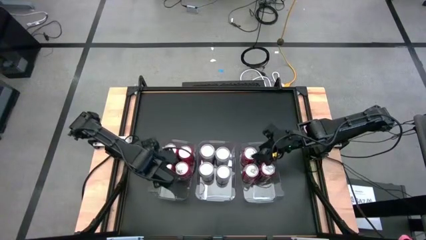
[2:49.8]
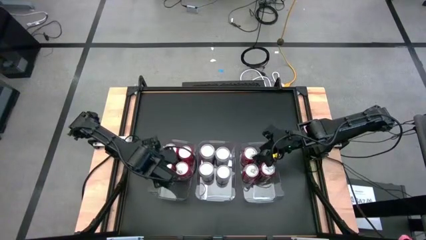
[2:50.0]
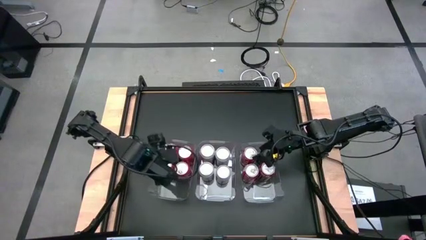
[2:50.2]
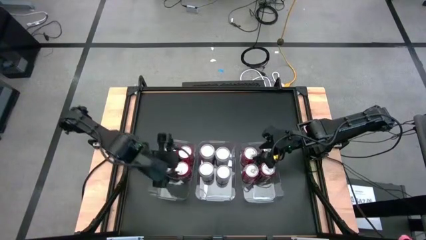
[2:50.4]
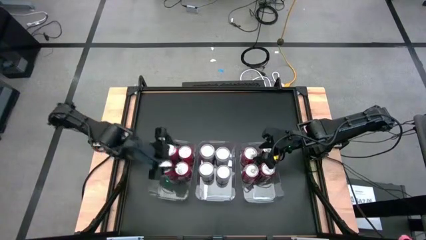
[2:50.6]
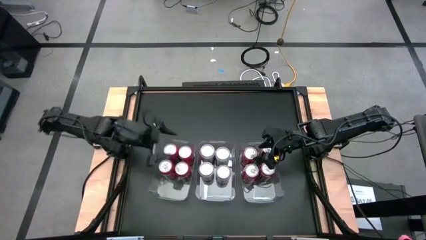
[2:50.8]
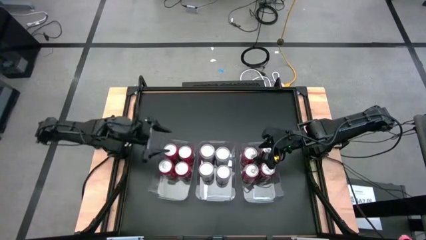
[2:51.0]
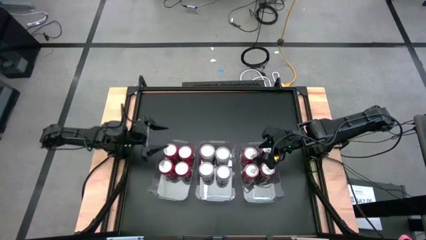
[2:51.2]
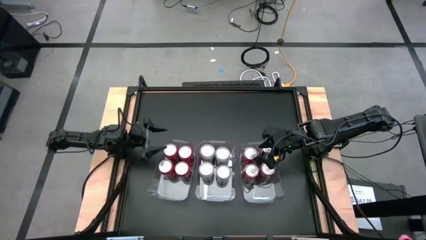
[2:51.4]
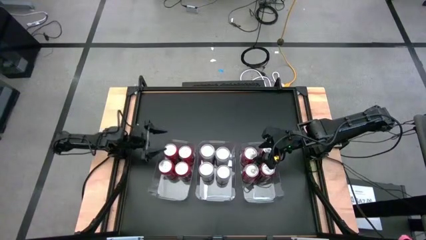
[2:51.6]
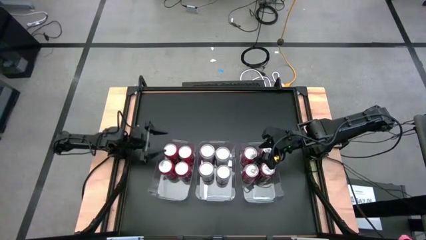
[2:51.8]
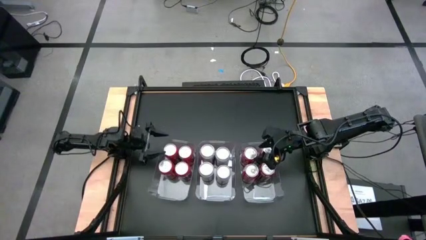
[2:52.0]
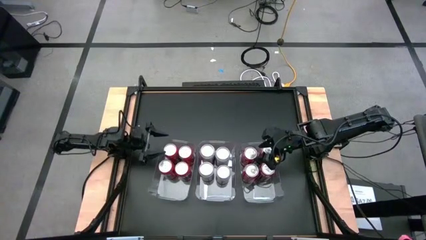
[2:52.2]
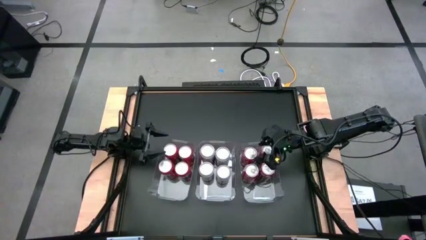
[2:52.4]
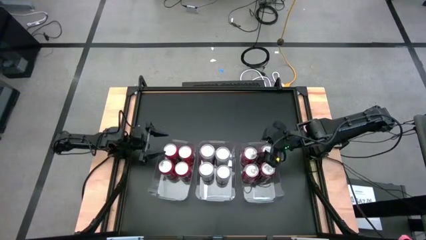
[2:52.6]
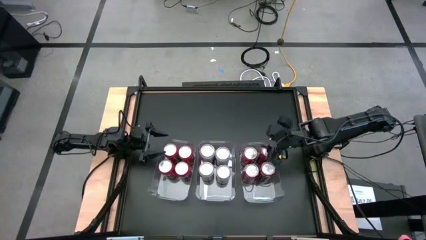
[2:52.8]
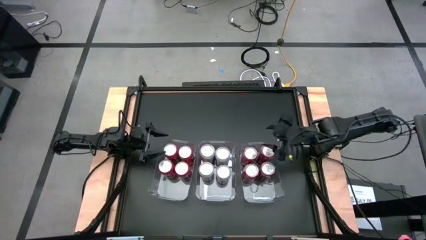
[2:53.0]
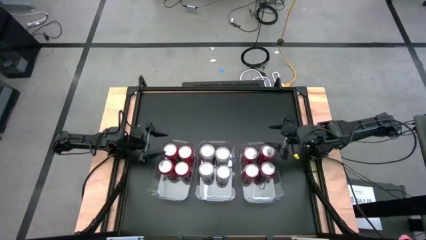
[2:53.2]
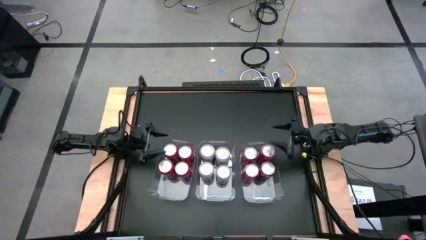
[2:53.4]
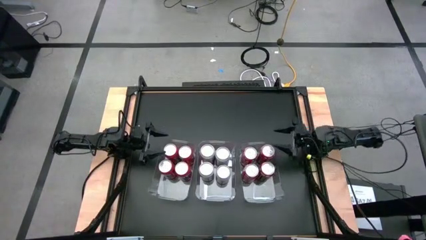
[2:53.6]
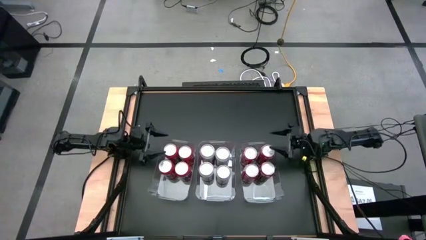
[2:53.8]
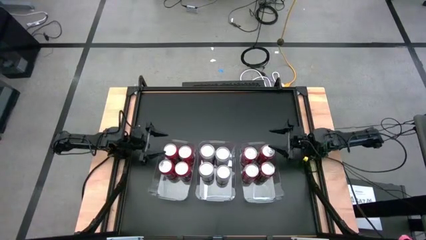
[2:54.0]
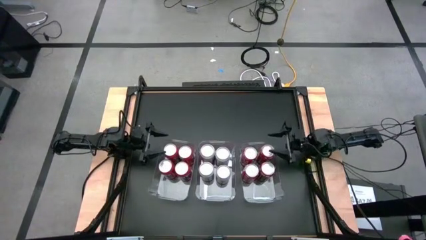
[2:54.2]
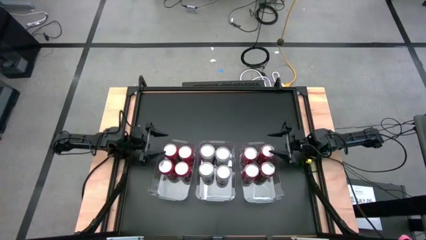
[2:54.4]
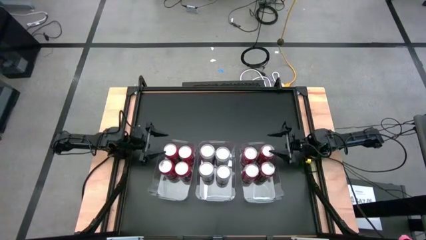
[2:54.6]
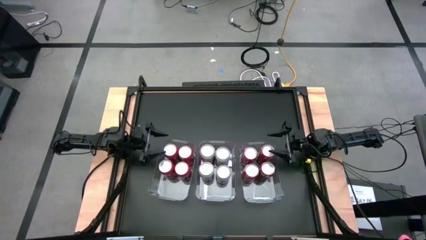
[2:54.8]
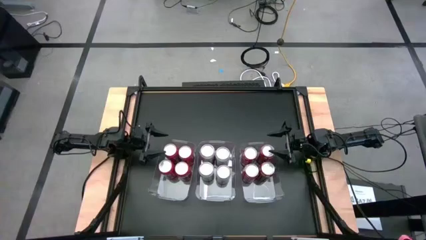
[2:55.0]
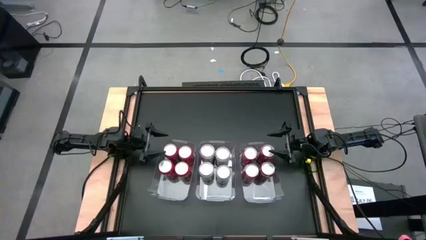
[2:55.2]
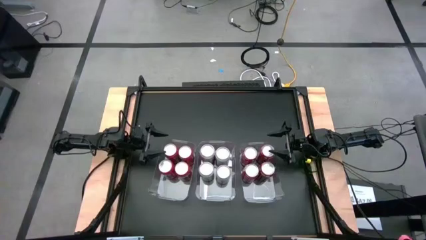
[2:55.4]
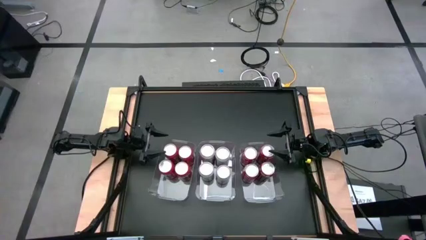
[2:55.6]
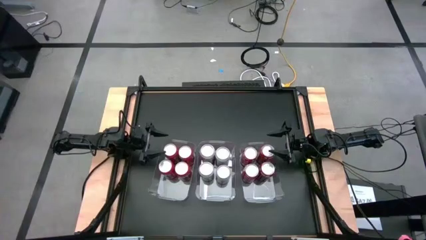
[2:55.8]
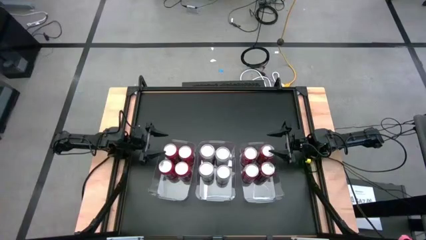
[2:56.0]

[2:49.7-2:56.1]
Task: Sort soda cans
Return to Home Position

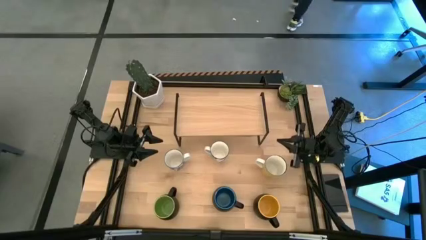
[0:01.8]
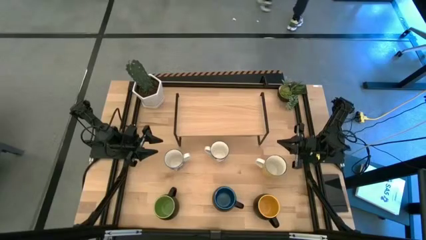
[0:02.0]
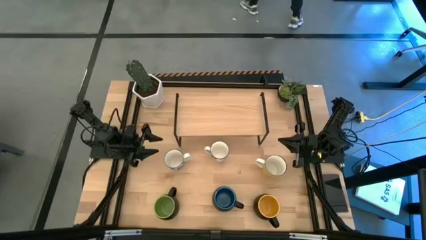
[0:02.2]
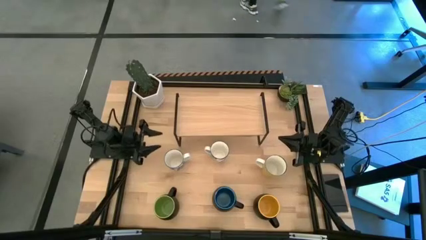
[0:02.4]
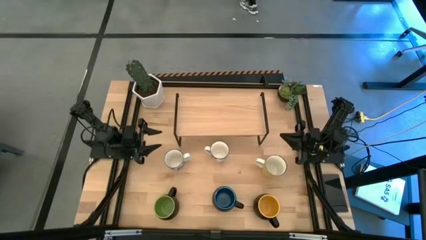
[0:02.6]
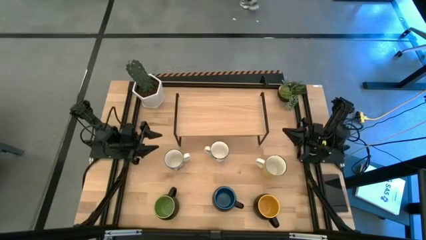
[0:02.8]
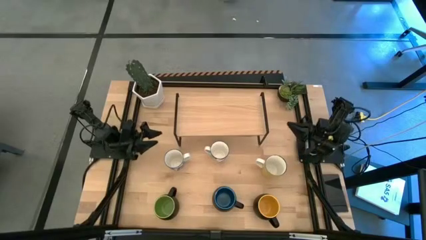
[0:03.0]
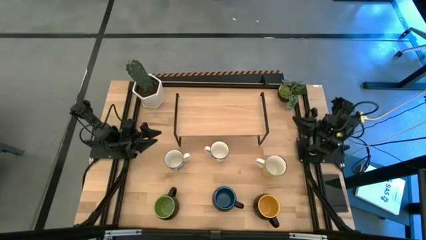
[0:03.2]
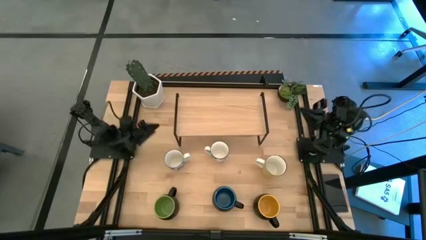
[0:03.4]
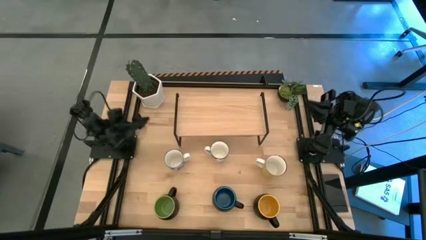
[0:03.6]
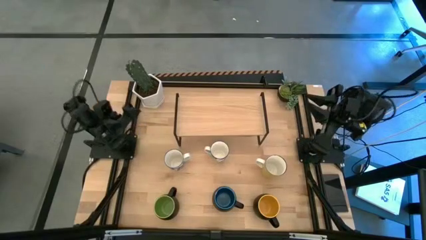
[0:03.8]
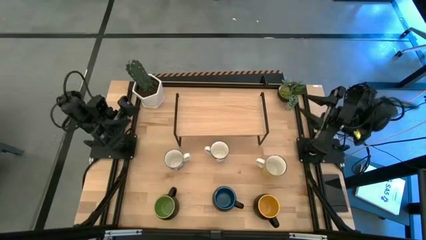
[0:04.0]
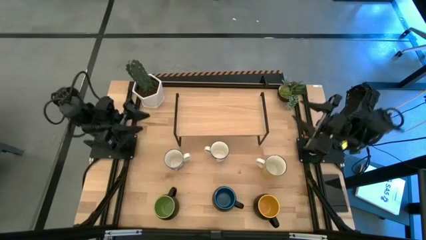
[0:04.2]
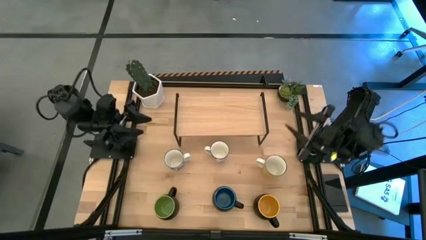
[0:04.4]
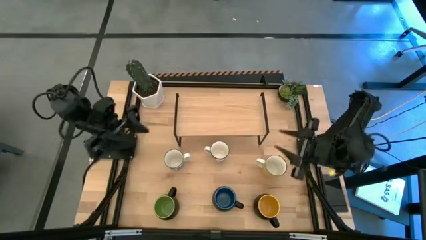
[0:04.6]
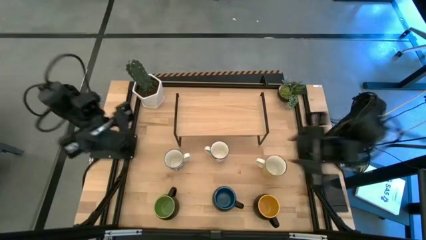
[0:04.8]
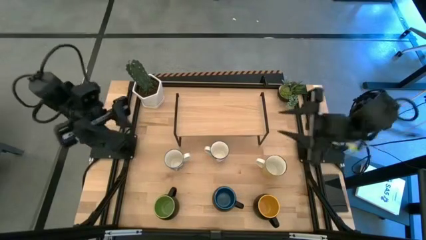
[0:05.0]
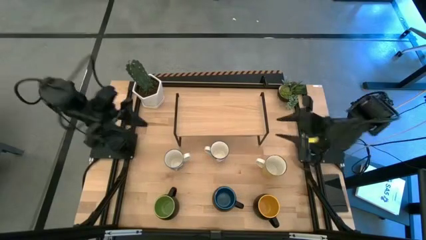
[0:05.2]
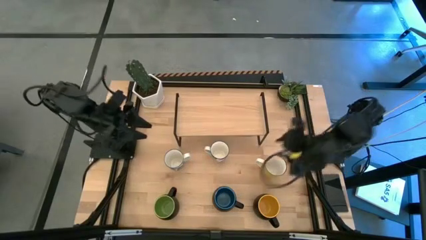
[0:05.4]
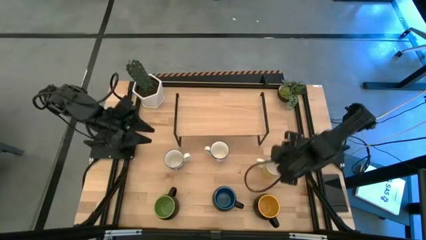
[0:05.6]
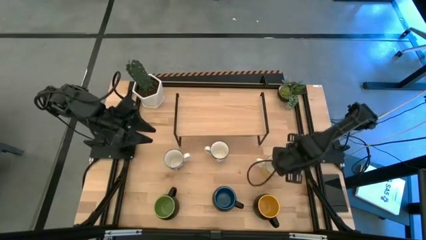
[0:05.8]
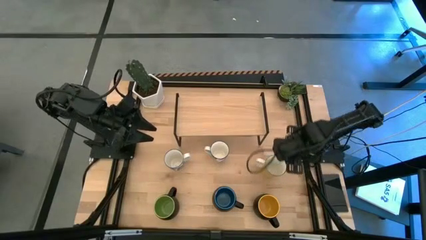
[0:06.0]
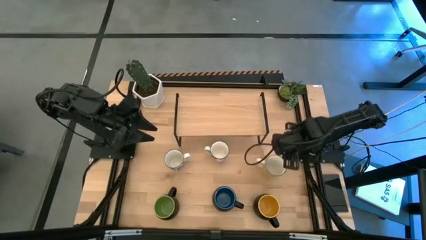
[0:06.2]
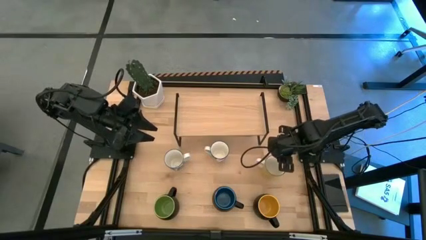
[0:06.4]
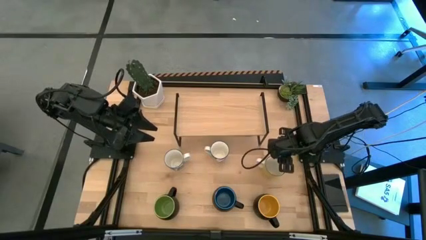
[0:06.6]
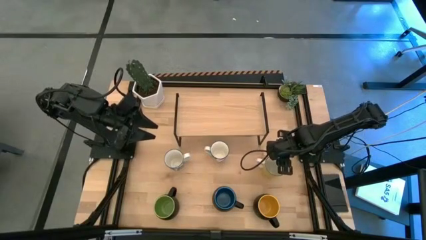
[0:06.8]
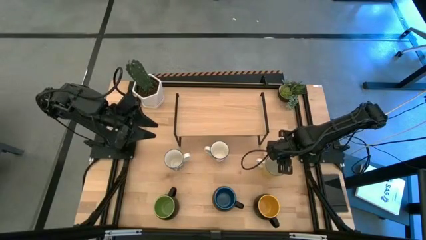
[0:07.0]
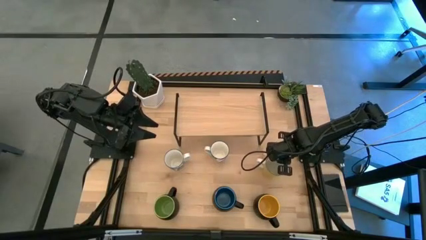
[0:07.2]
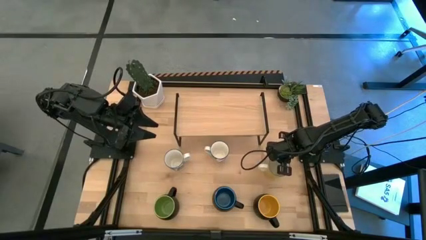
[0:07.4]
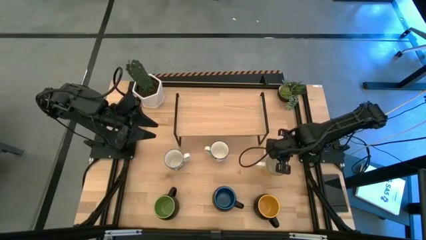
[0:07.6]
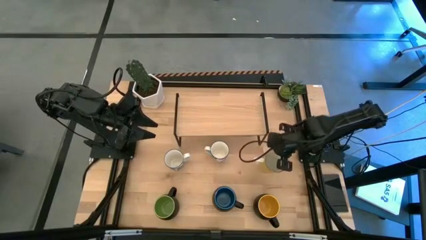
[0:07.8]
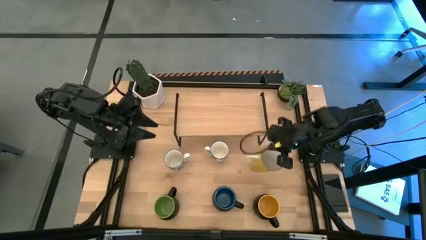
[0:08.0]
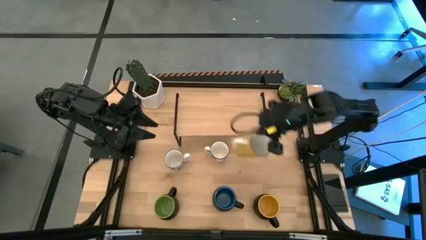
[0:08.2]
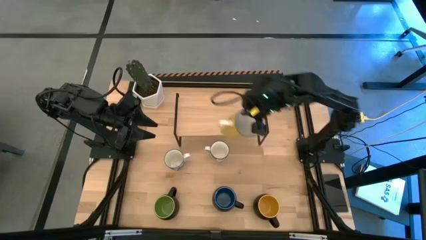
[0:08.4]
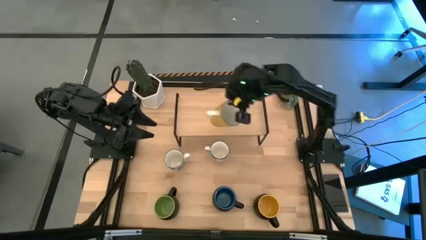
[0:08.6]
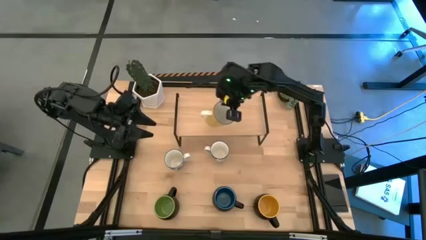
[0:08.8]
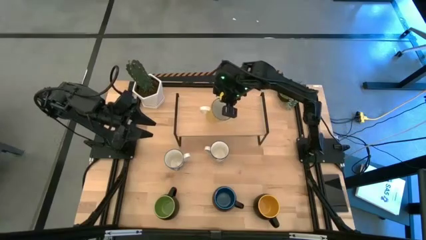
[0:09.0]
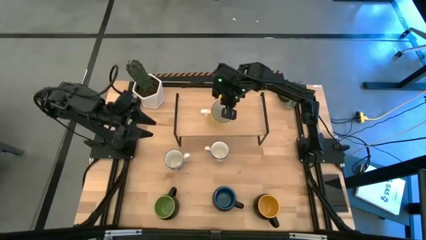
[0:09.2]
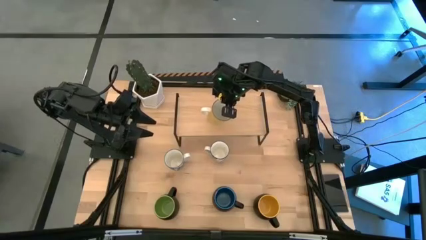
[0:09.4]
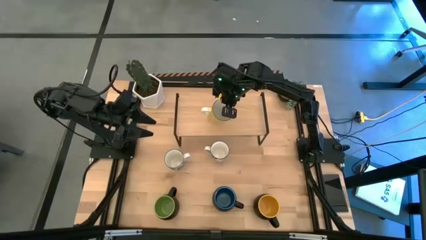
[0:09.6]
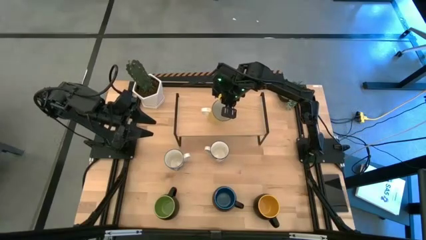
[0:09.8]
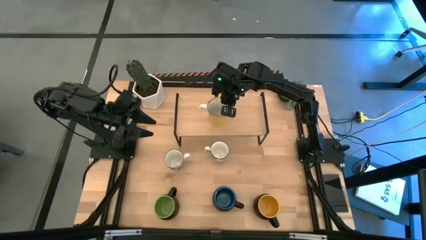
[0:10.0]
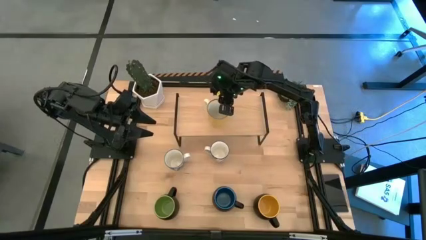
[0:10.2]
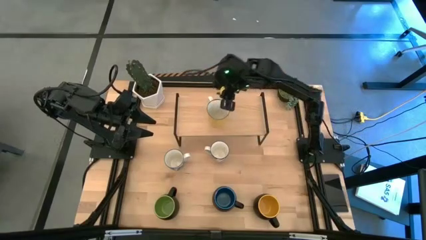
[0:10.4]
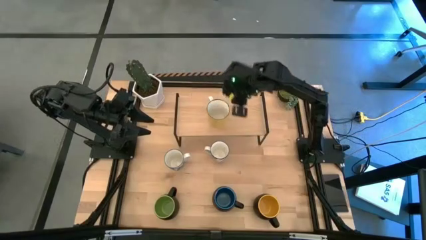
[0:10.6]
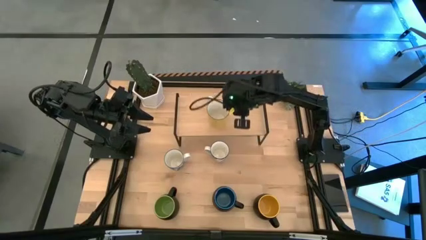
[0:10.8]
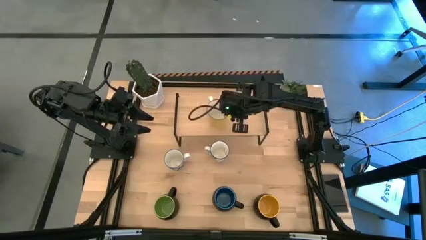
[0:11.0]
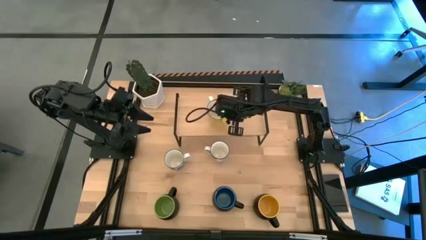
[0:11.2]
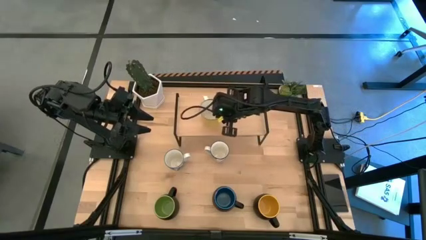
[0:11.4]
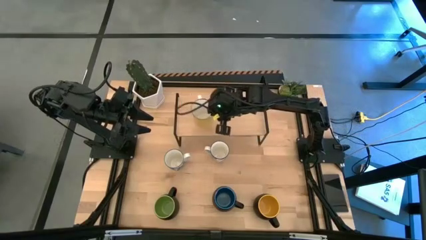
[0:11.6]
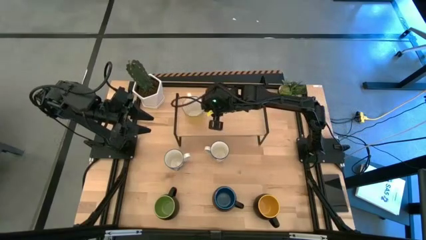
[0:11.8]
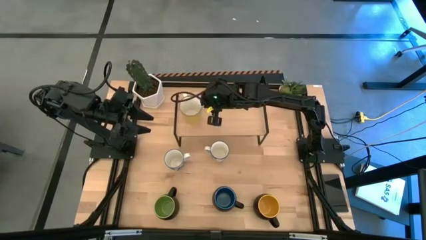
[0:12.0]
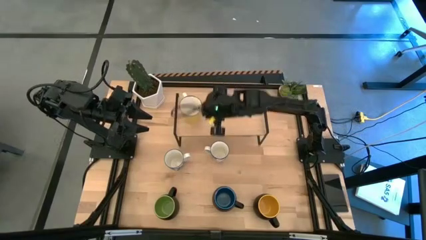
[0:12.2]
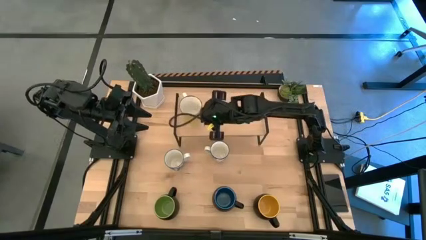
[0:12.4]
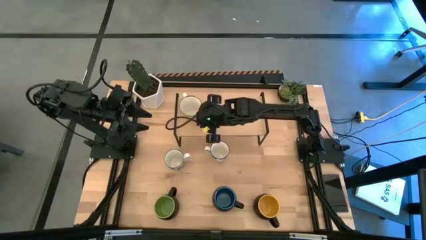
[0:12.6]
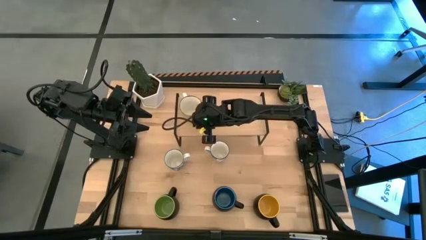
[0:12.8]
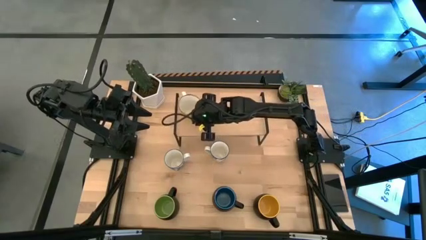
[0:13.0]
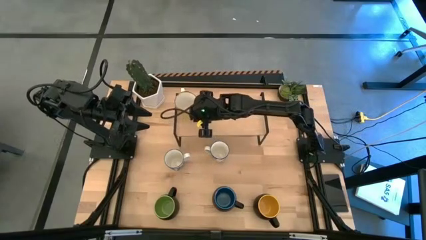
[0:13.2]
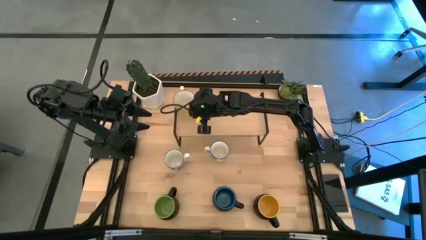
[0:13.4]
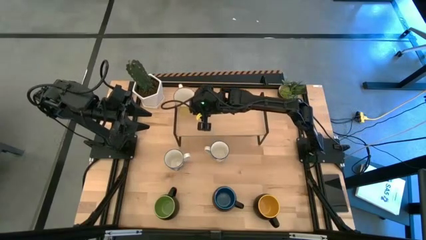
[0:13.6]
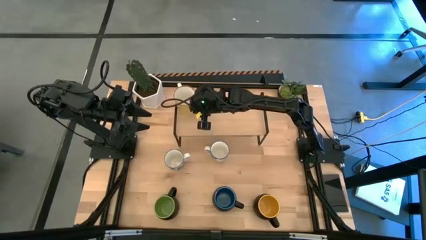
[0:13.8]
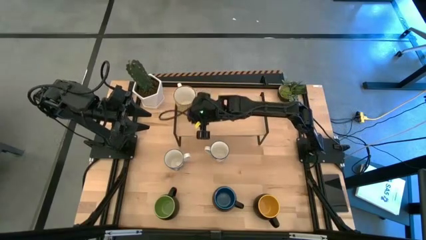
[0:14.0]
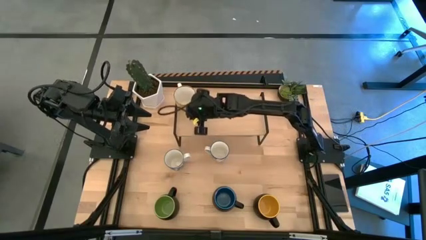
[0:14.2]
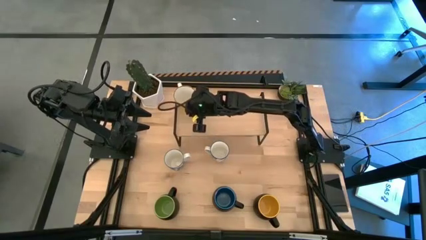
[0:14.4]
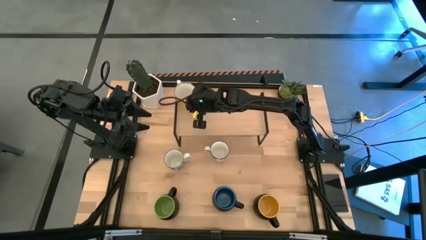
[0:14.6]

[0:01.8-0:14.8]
Task: Place coffee mugs
Put the yellow cup on the shelf
